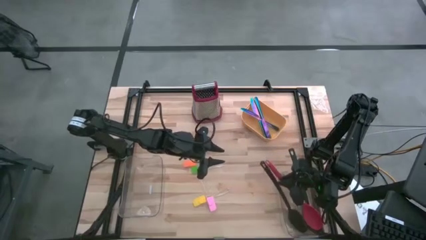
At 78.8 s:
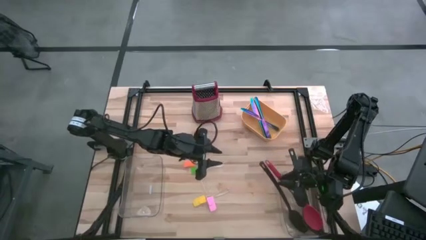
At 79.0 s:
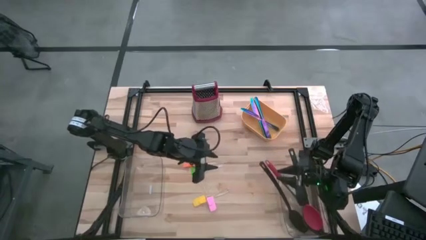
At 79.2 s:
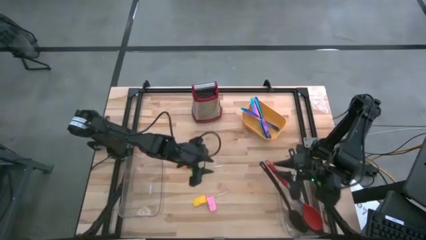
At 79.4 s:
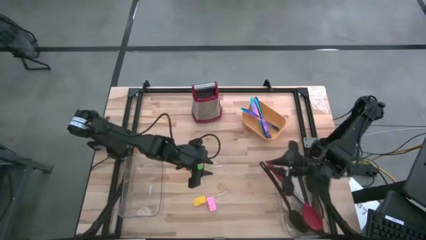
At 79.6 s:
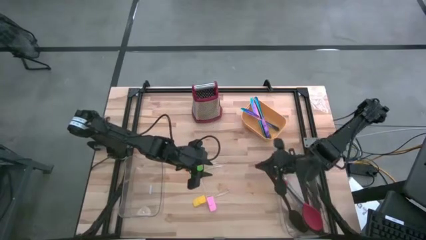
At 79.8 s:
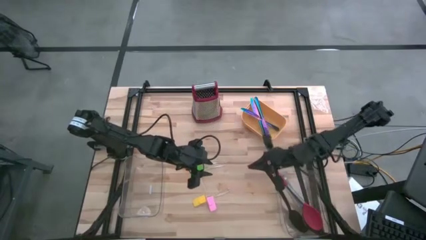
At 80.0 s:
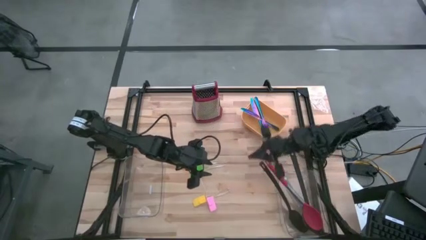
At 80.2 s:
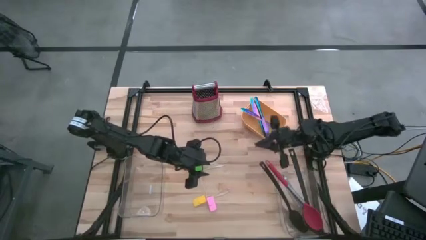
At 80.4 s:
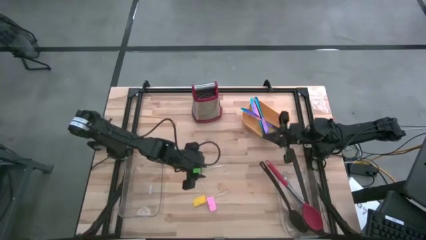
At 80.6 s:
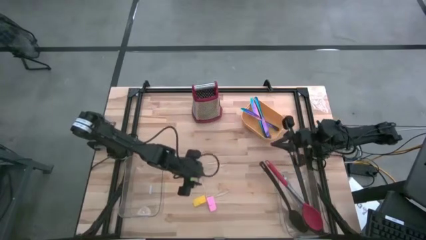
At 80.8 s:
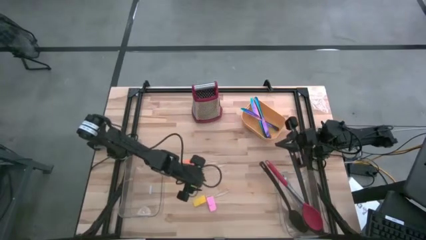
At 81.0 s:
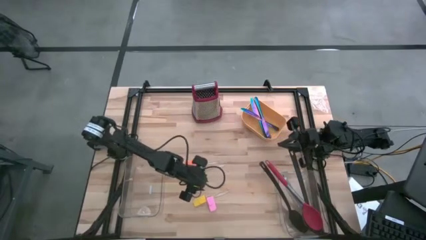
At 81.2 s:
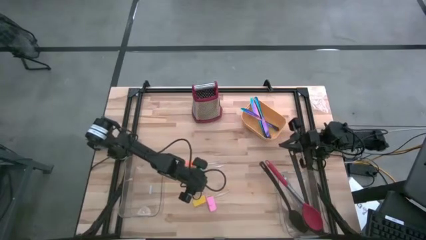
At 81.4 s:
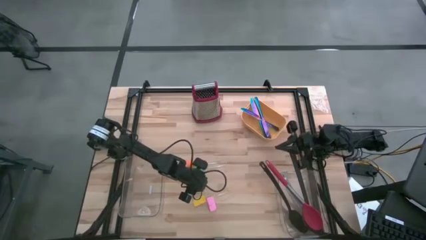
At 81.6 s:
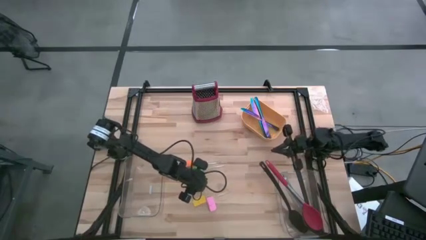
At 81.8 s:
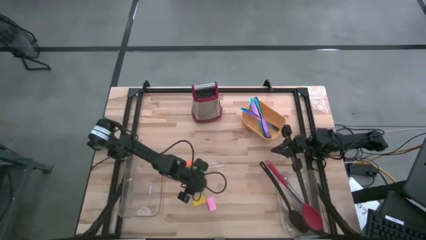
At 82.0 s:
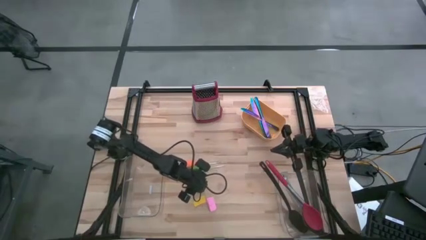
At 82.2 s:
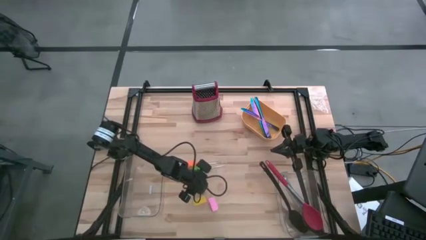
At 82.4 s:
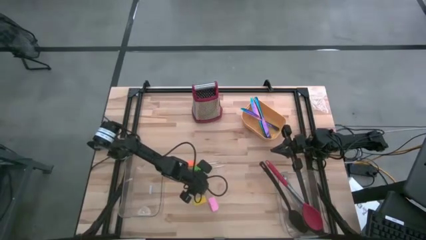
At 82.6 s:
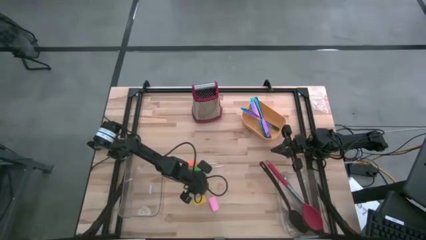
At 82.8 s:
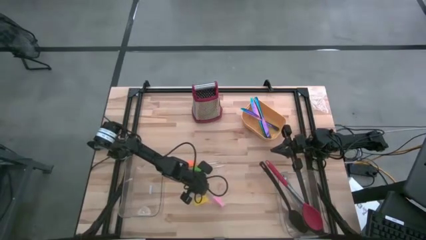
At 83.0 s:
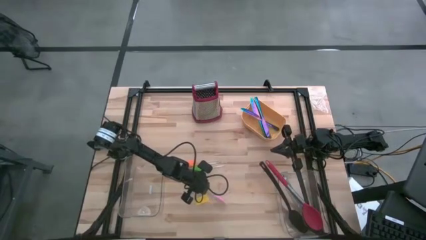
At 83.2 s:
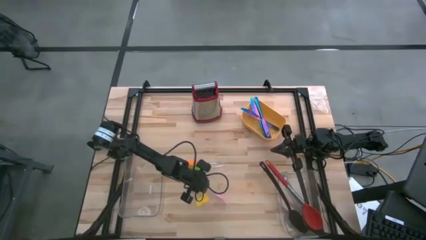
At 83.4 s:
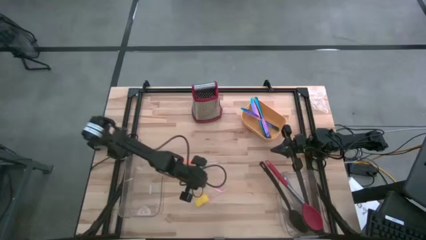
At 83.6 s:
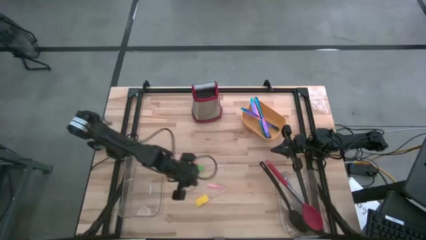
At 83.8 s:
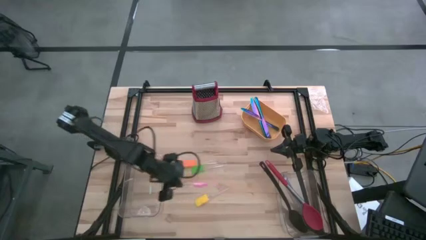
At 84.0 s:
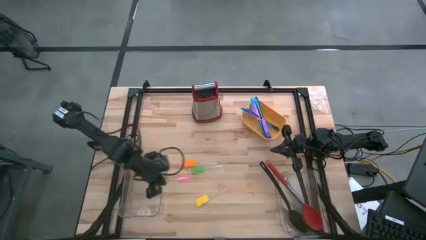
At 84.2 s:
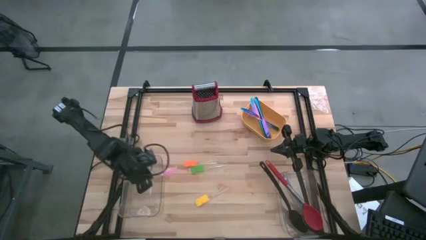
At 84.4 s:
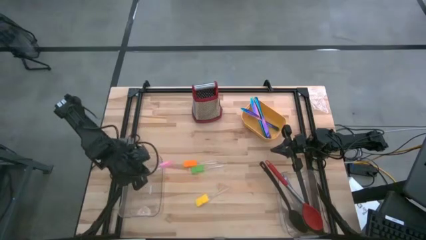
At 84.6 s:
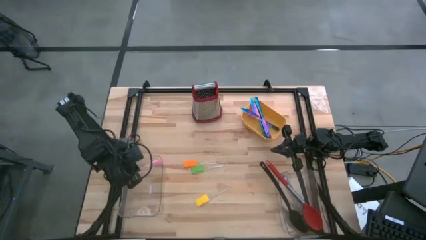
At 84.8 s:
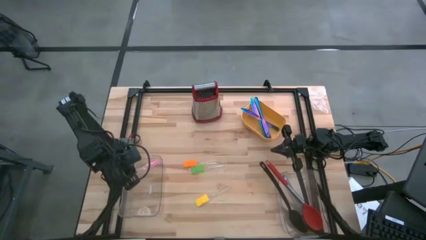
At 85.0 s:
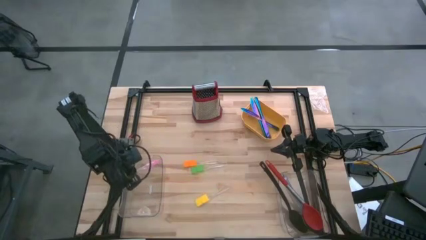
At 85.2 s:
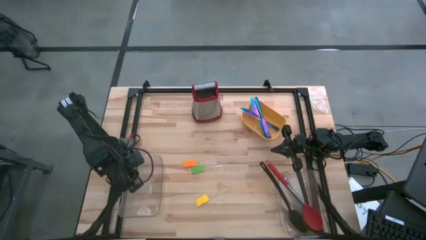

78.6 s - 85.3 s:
Task: Pick & Place Kitchen Items
Put the pink spatula into the left transparent bin

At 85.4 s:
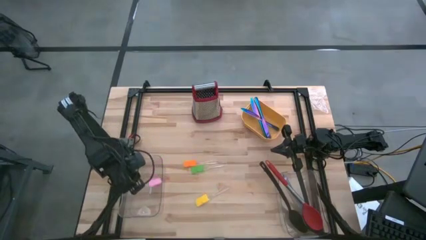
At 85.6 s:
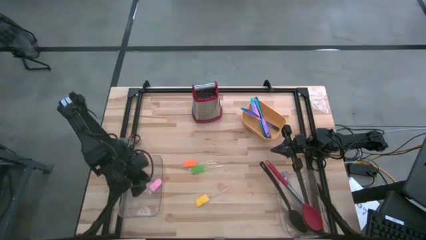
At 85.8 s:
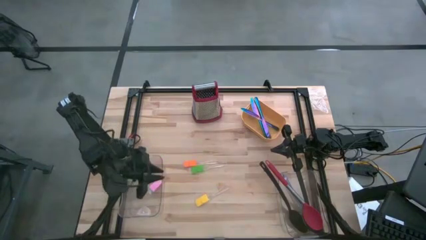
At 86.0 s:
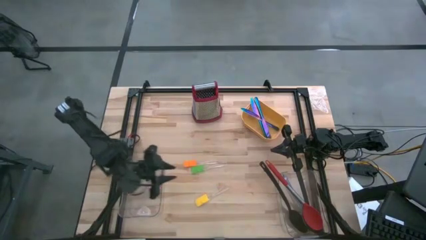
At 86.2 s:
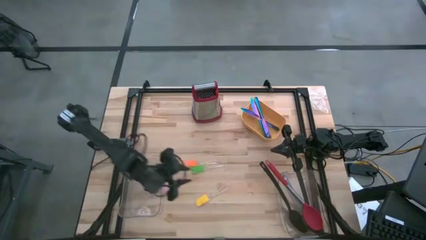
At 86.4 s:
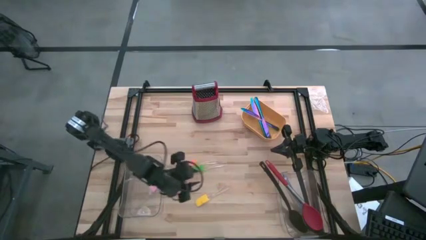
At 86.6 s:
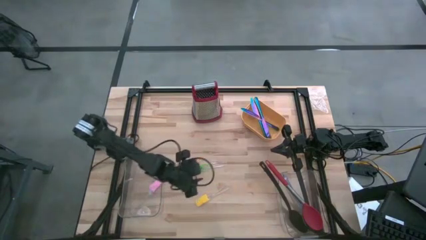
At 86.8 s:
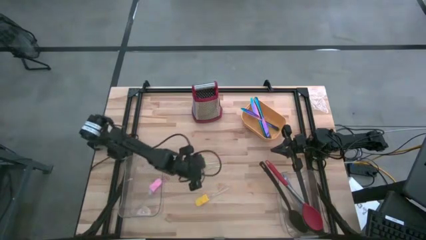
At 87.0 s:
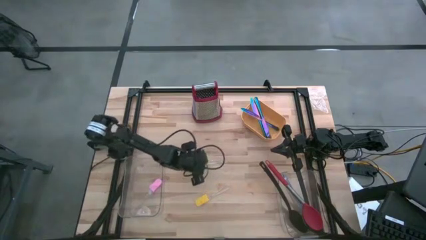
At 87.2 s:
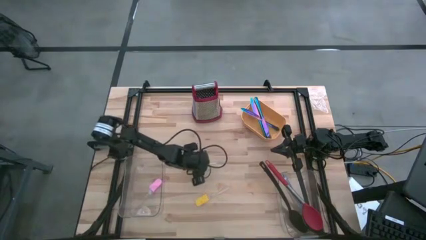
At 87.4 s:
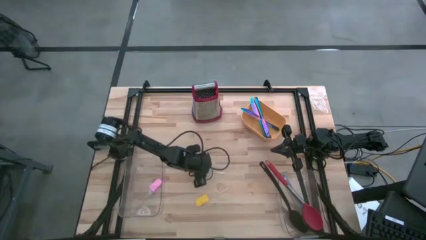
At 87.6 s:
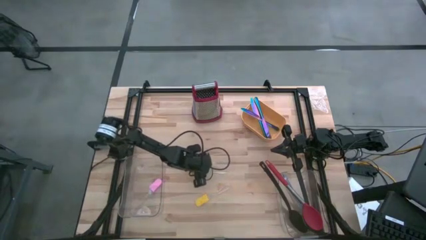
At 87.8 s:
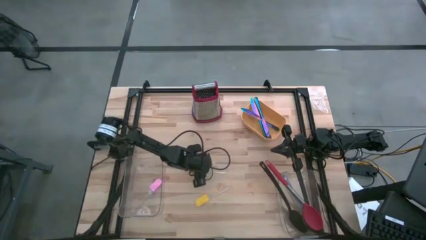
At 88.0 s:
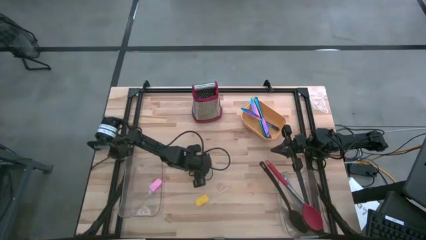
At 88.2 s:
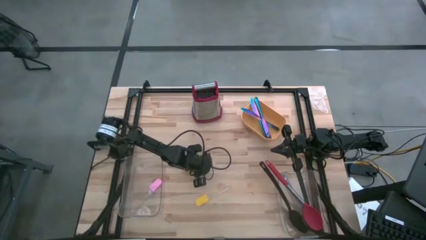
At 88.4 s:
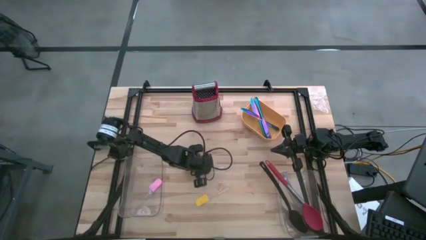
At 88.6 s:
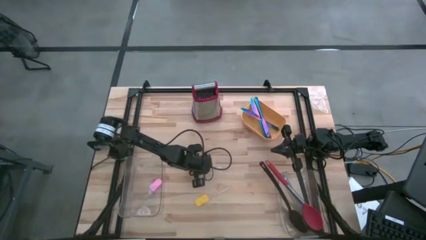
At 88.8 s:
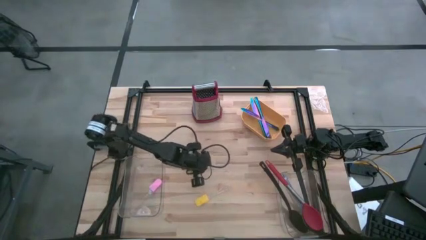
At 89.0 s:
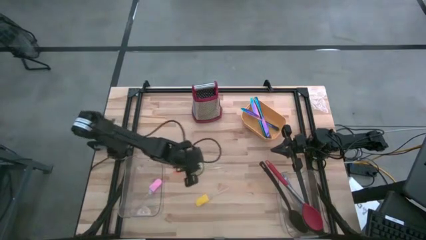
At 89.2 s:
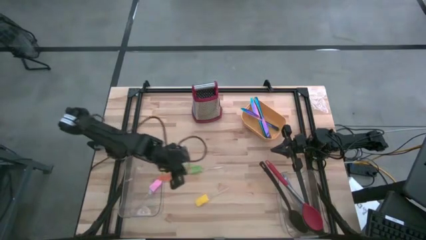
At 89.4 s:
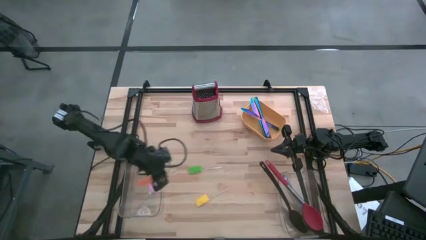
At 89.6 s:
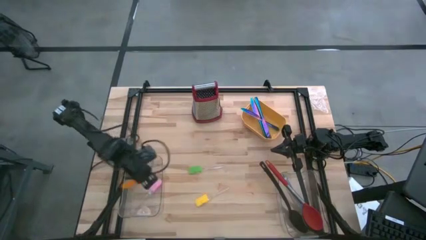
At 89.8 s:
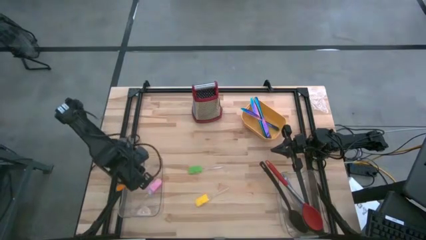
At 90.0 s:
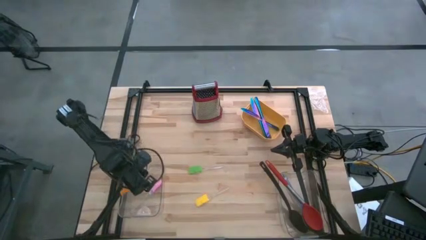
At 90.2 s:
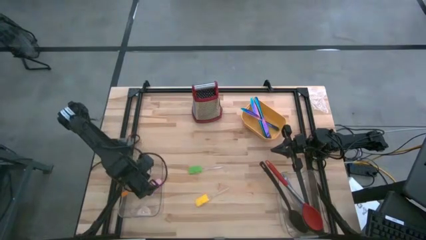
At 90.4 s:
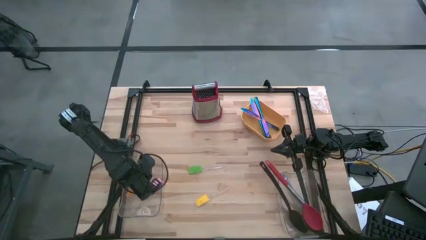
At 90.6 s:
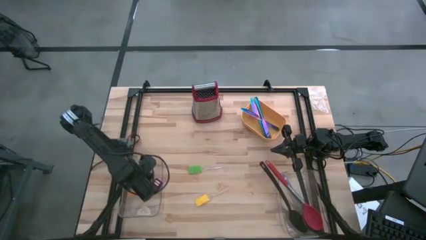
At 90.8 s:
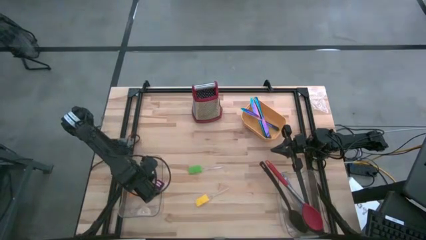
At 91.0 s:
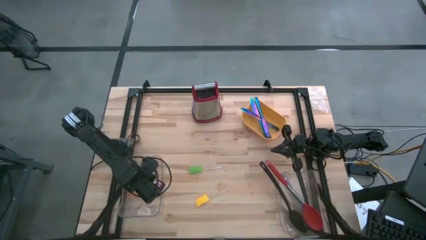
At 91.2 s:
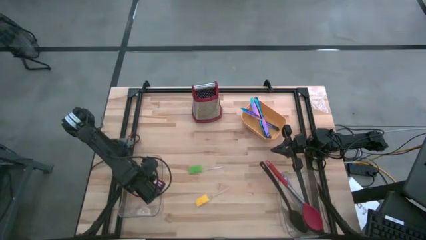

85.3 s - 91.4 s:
Put the orange spatula into the left transparent bin

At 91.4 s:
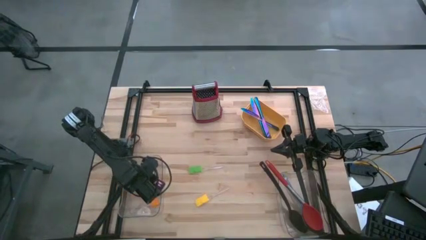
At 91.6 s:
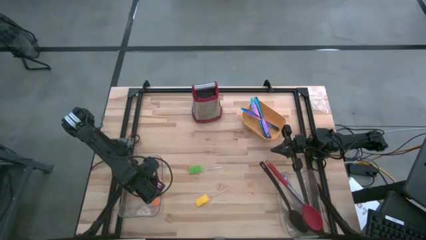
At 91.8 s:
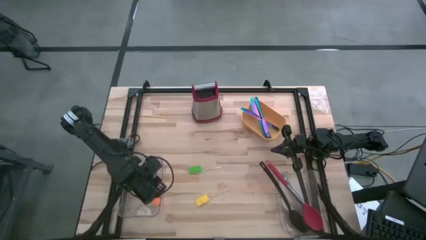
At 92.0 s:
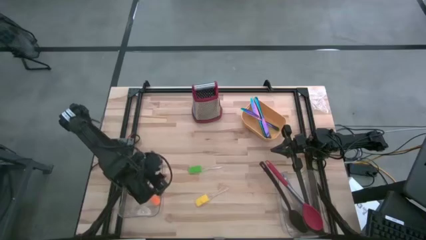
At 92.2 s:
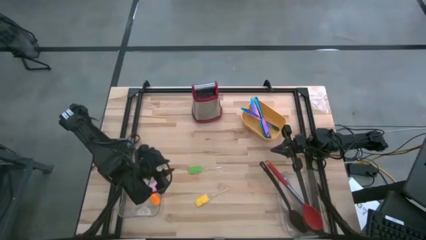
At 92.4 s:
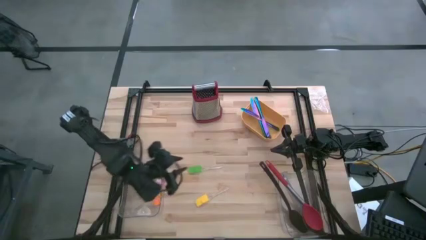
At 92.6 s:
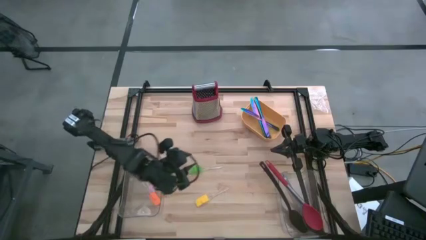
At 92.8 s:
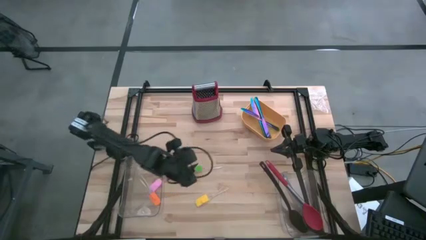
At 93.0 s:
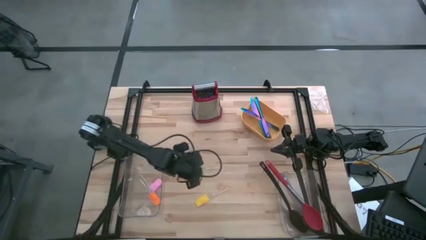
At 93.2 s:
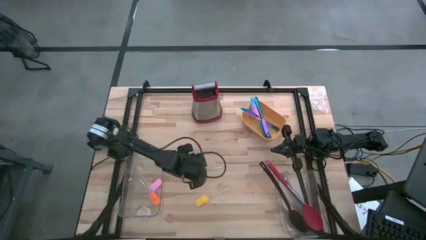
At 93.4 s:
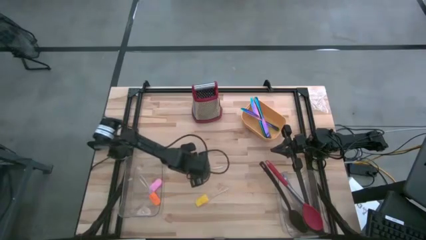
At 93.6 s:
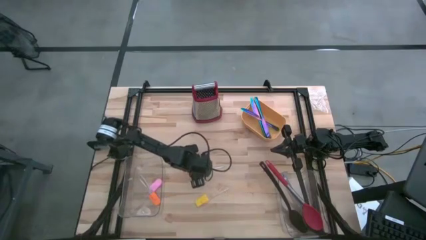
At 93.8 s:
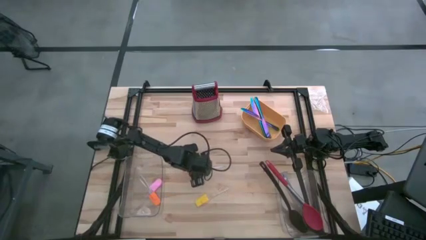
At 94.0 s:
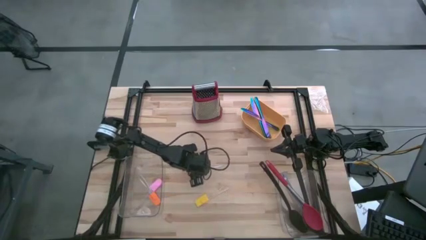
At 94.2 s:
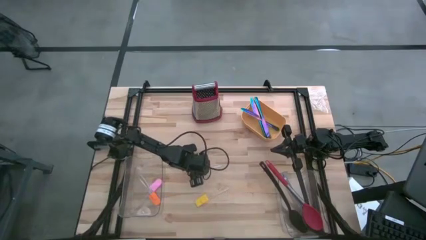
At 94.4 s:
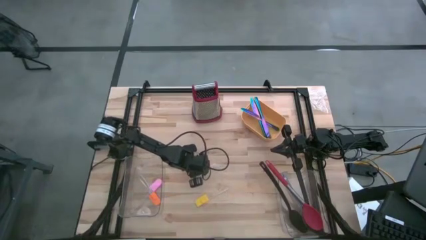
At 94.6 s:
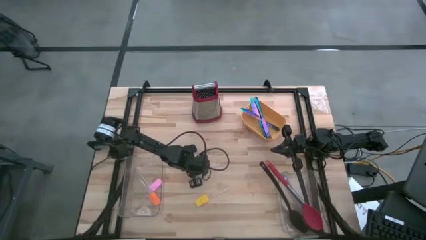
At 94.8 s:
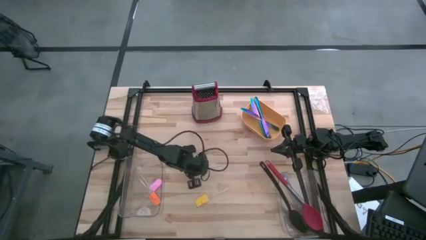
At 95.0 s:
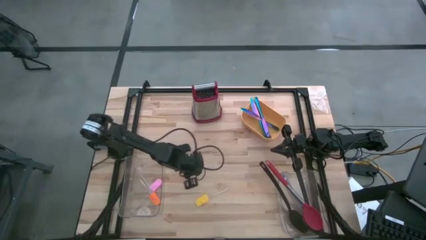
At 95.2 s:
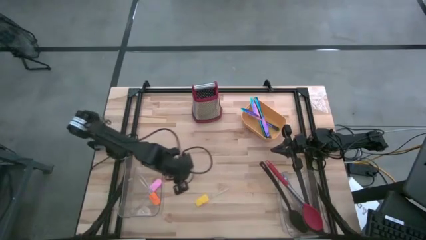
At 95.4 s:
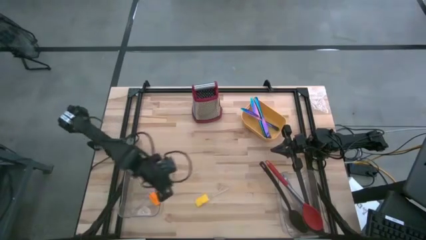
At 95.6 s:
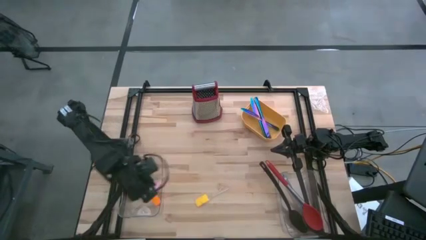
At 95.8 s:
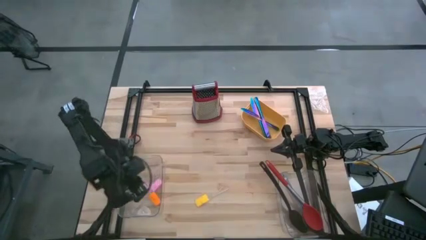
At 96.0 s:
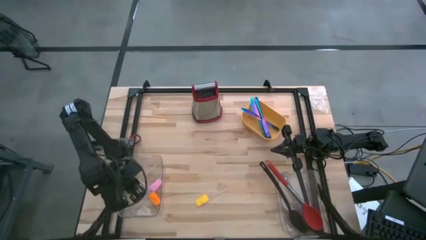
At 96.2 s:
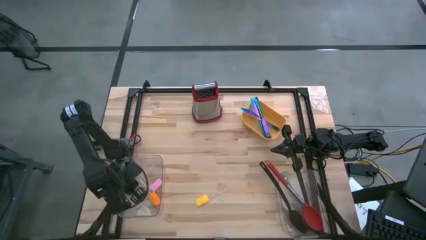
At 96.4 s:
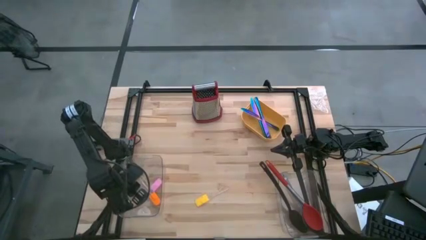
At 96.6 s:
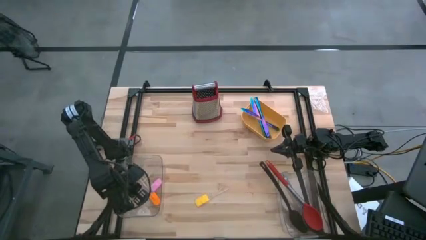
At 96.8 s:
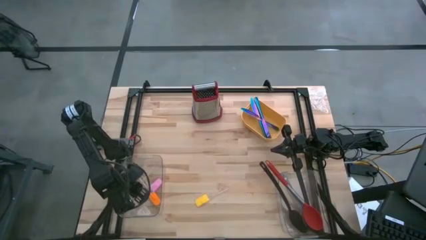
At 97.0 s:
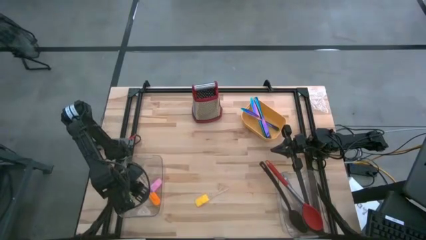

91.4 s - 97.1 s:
Put the green spatula into the left transparent bin
